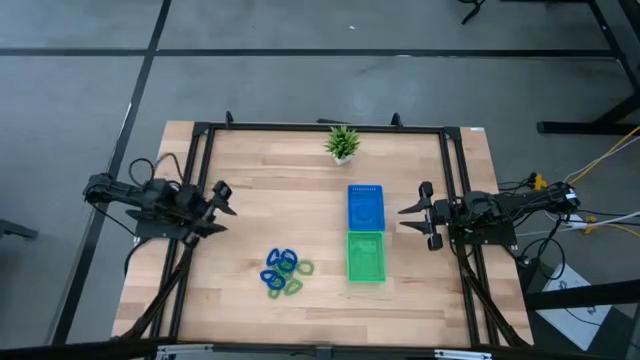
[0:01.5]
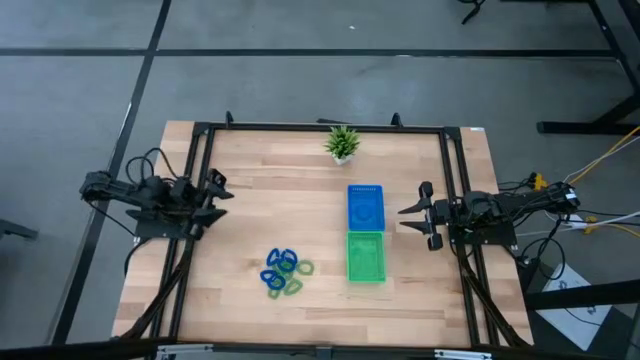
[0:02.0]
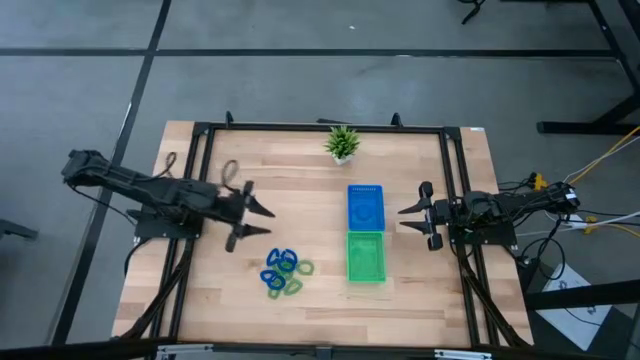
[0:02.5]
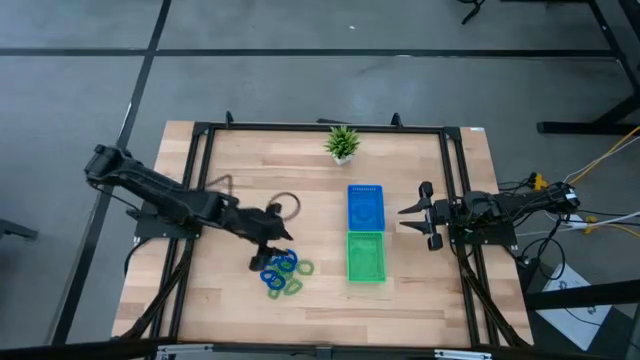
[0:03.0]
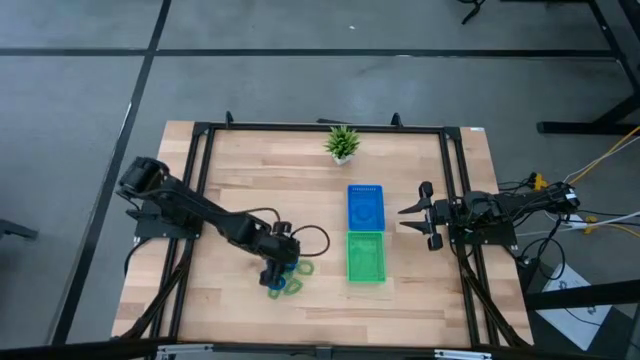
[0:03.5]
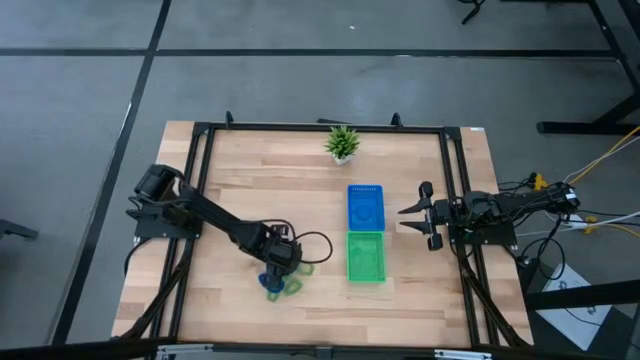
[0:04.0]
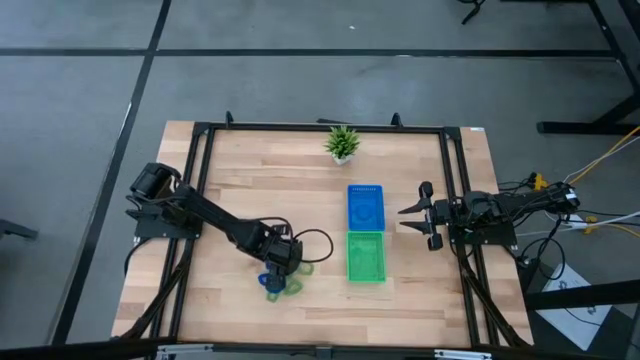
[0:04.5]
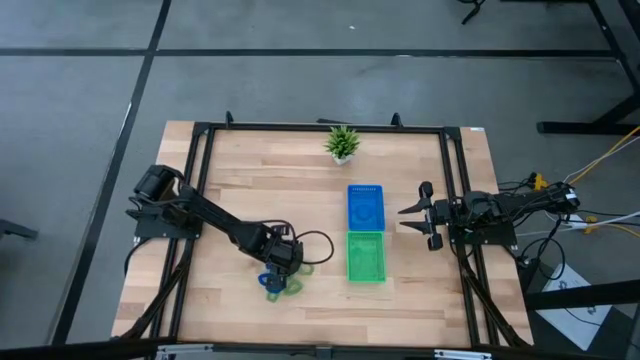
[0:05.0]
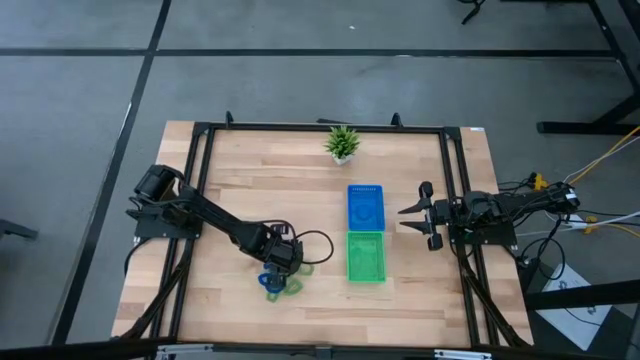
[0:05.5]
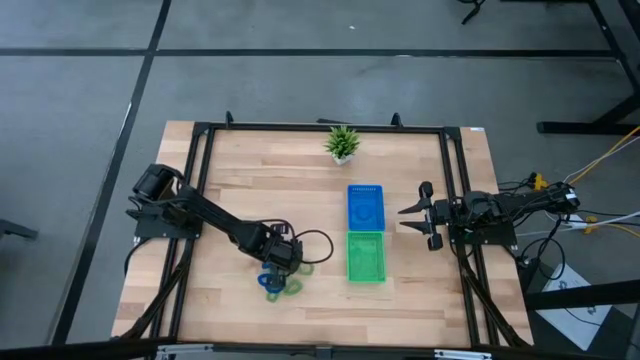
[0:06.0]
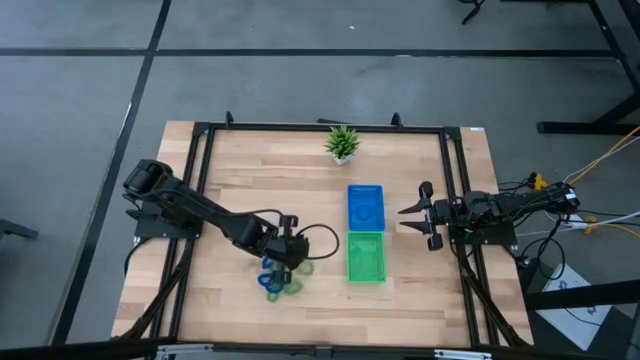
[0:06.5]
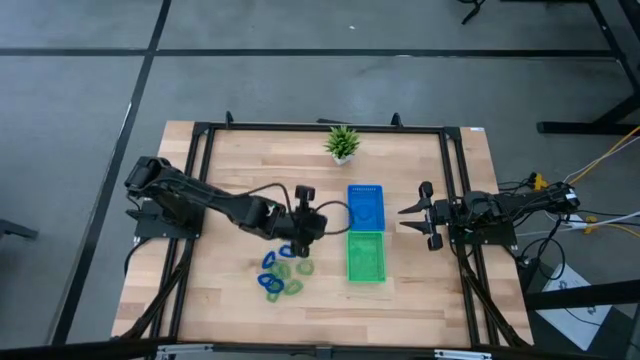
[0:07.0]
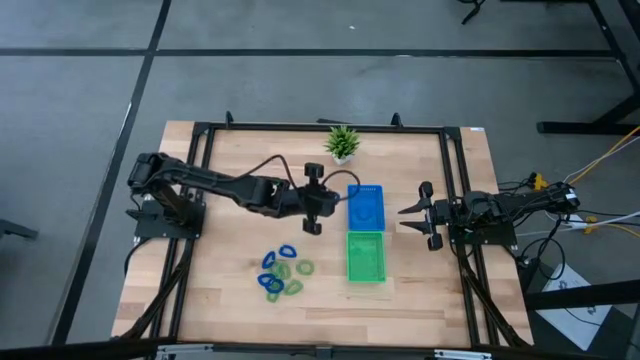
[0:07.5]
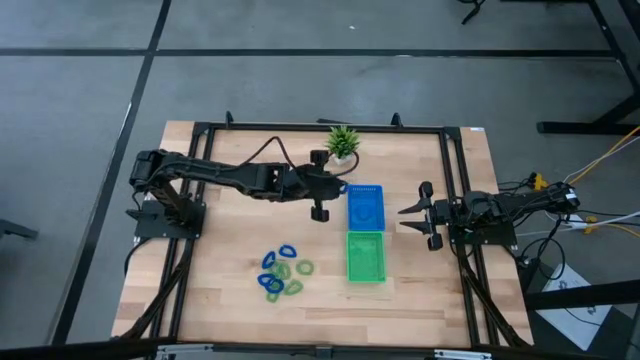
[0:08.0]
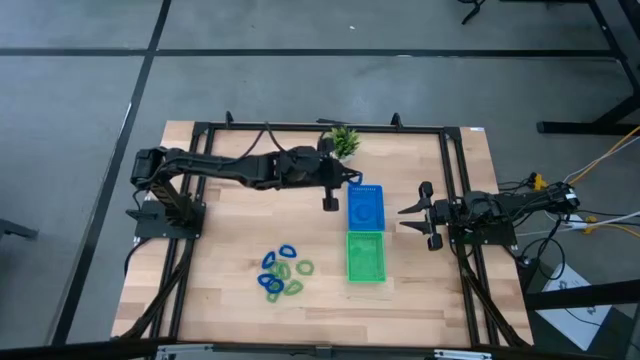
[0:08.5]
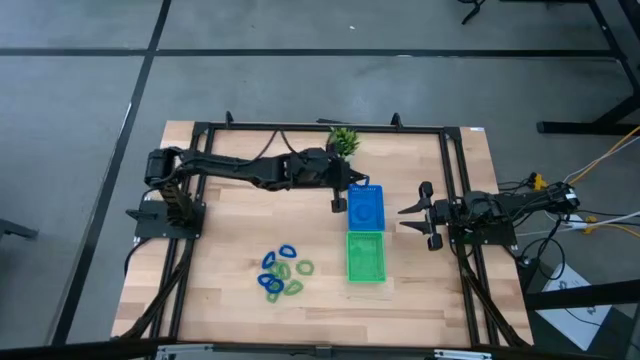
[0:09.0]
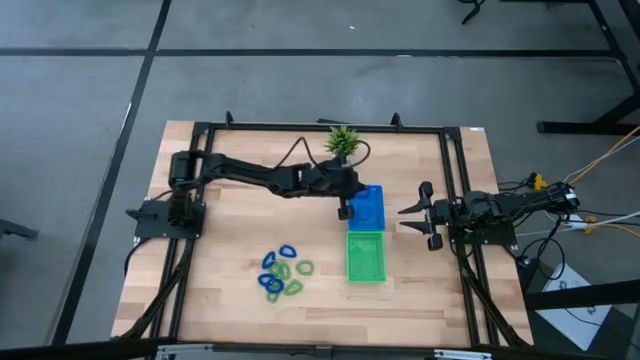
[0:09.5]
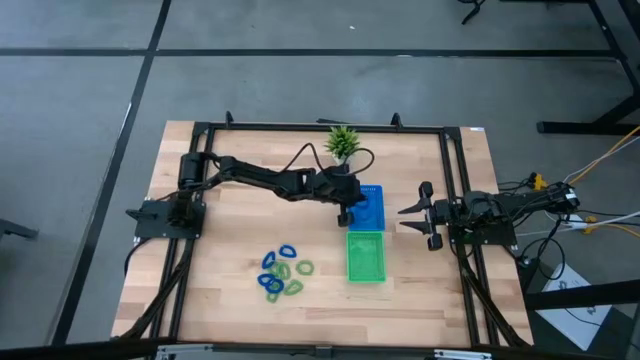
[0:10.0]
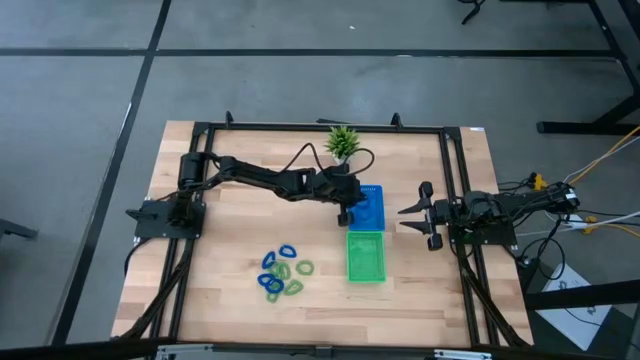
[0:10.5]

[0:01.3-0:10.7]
Task: Sort spring keychains
Put the blue spring keychain into the blue bin

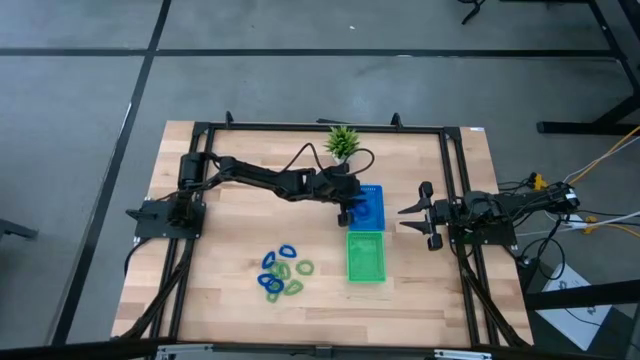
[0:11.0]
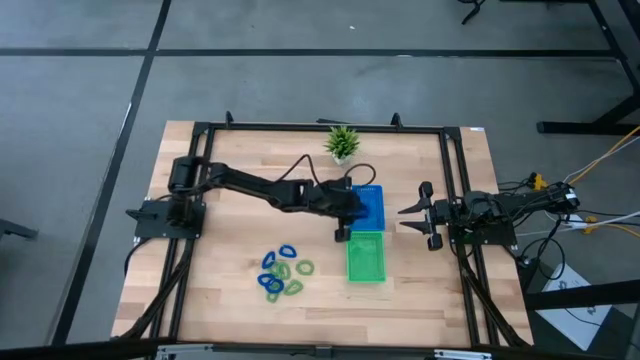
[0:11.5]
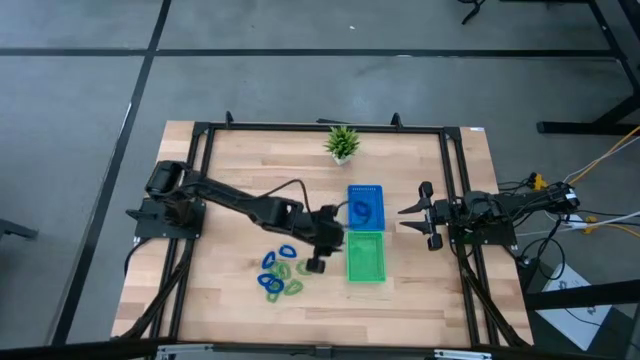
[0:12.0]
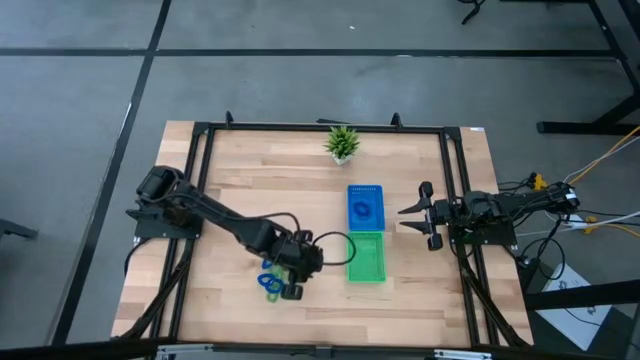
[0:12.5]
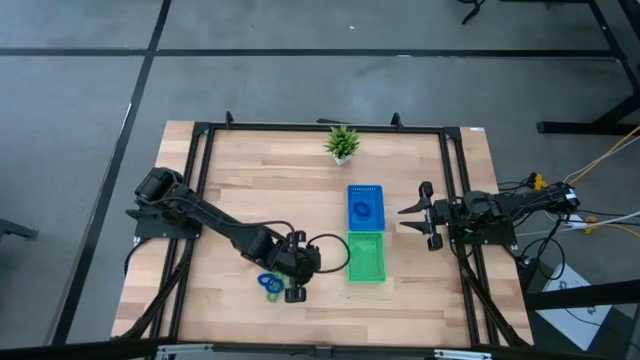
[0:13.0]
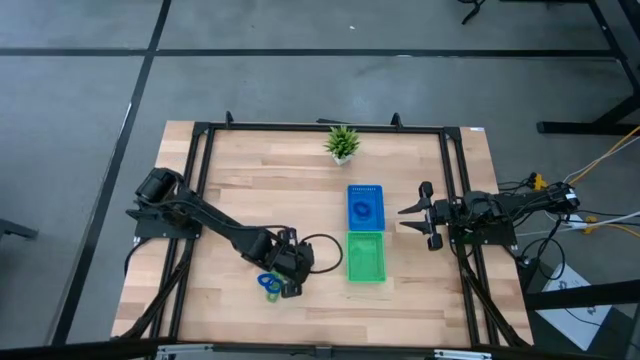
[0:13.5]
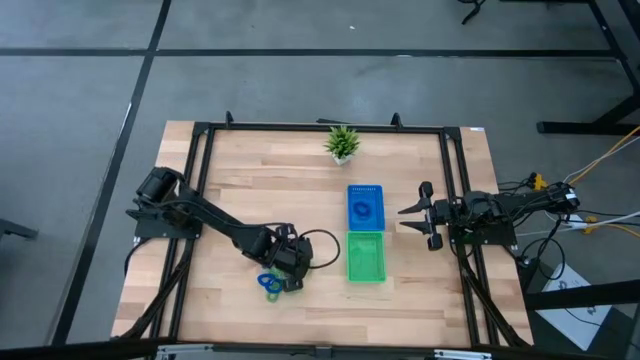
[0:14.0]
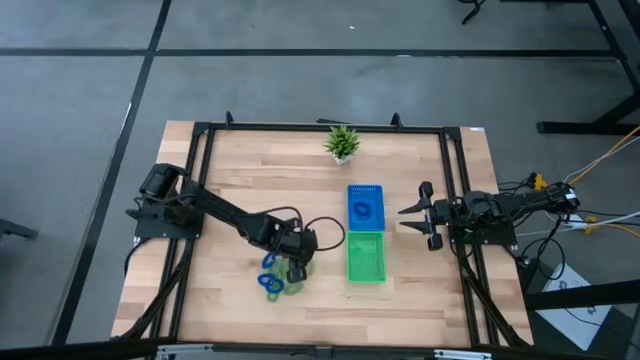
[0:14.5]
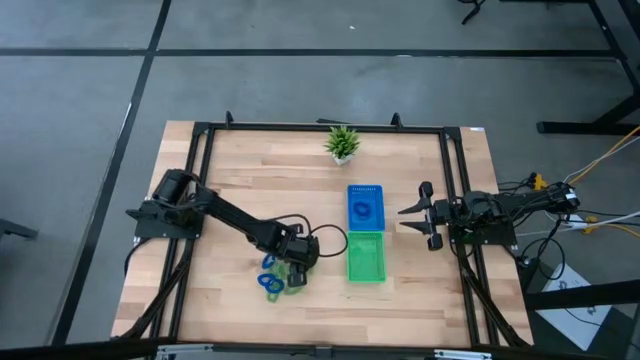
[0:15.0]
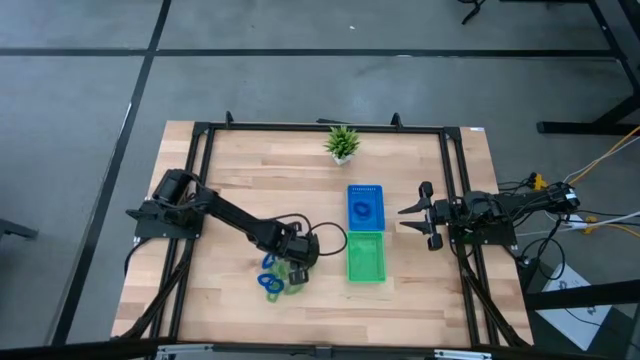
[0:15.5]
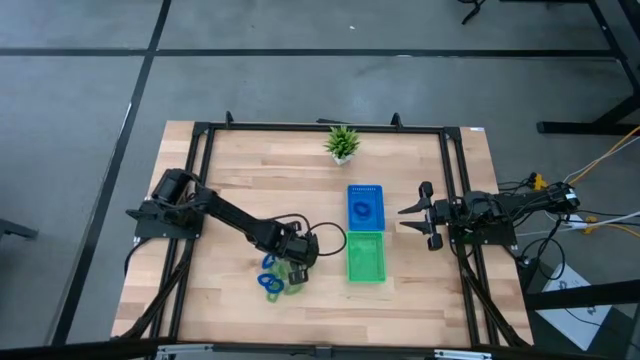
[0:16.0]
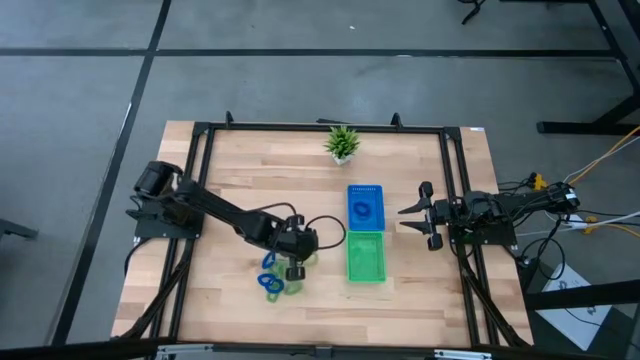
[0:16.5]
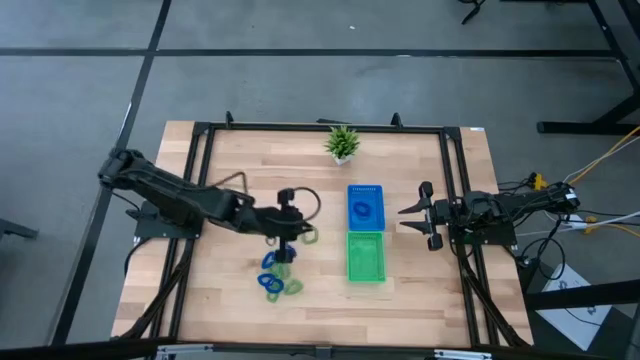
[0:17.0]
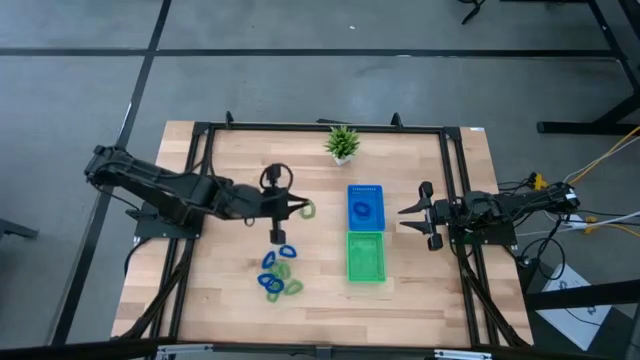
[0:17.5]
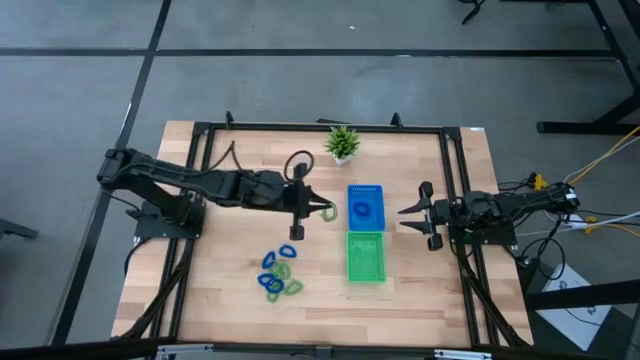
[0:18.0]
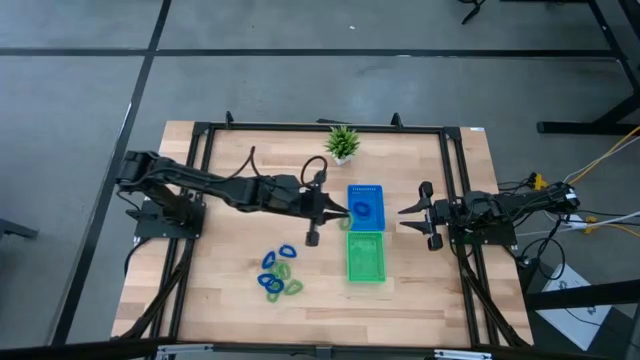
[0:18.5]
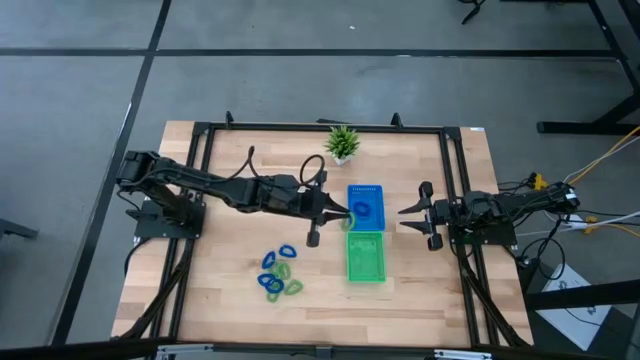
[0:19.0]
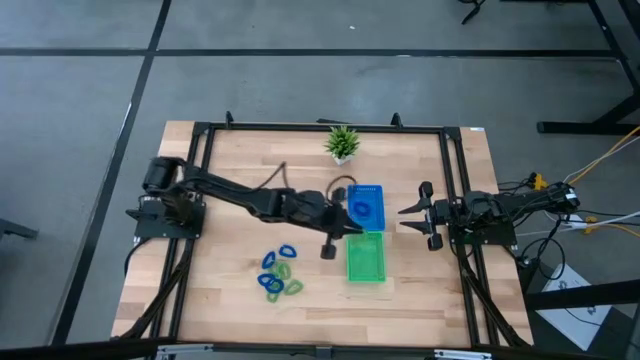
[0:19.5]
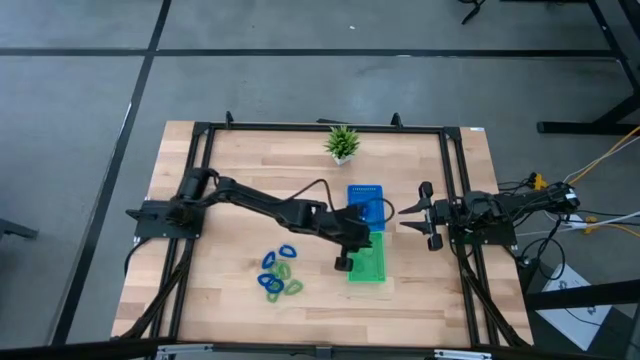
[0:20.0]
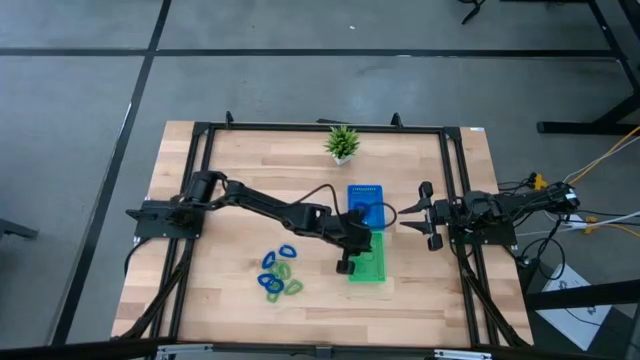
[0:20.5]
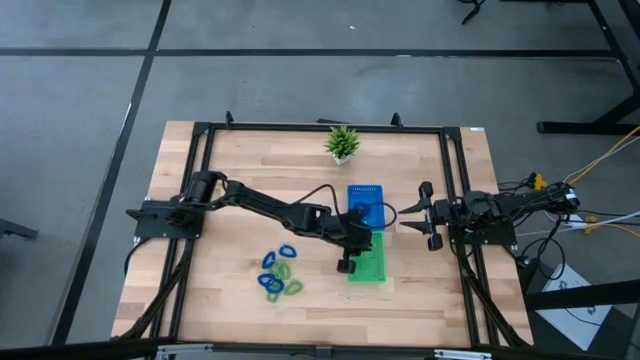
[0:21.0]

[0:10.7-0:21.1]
Put the green spring keychain into the green bin
